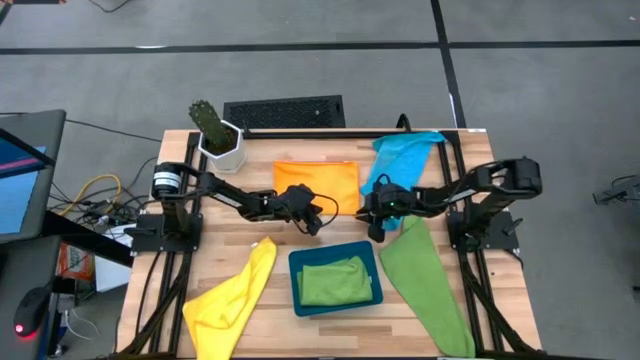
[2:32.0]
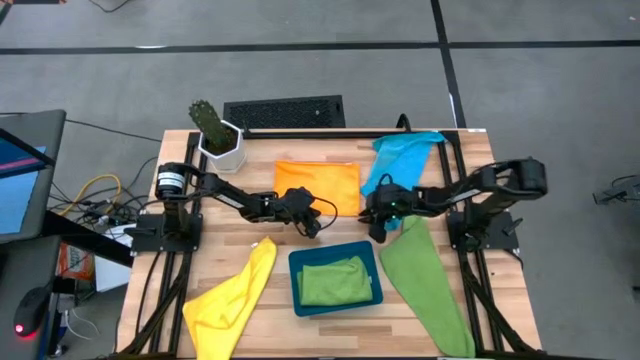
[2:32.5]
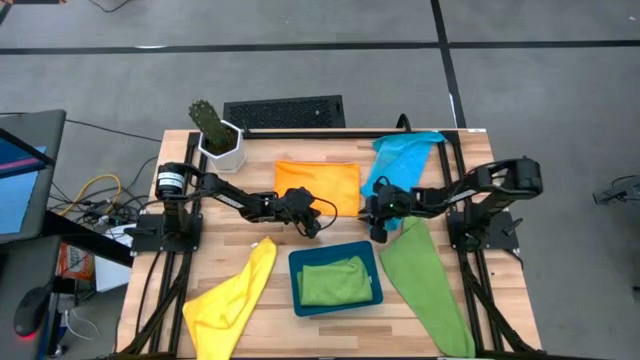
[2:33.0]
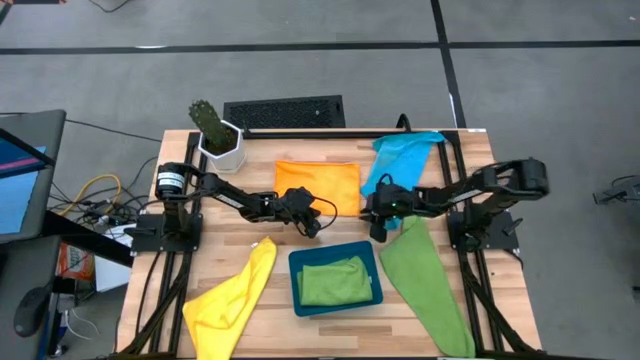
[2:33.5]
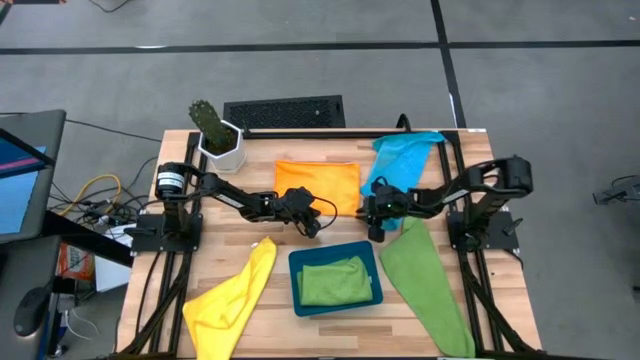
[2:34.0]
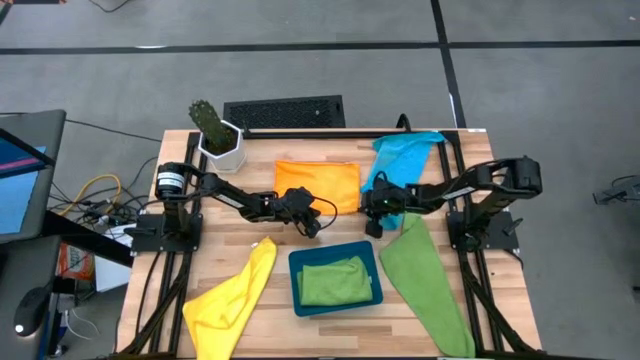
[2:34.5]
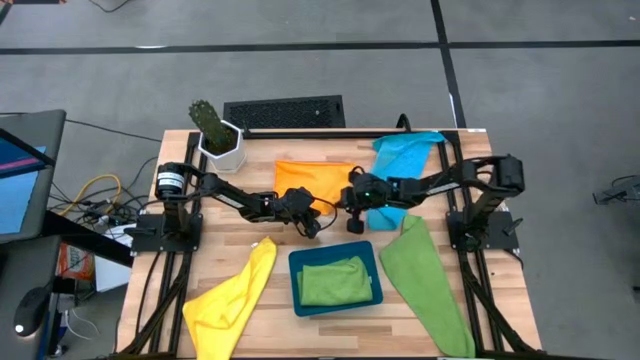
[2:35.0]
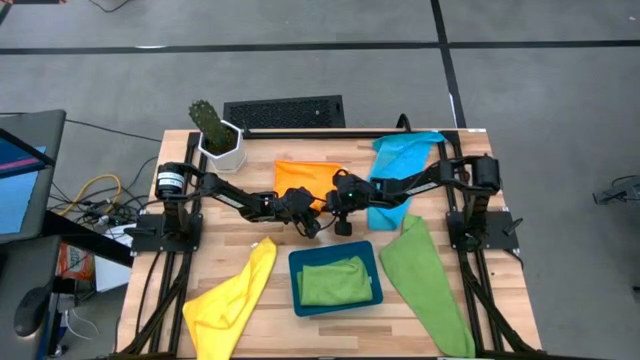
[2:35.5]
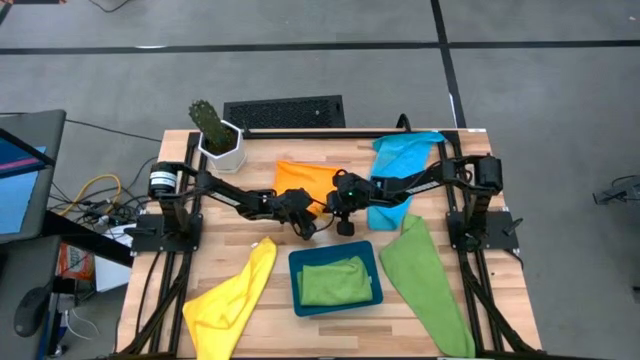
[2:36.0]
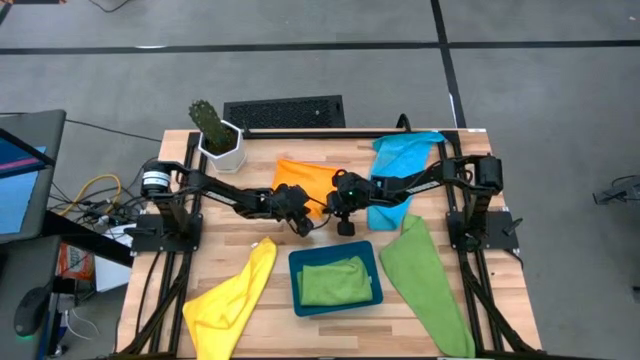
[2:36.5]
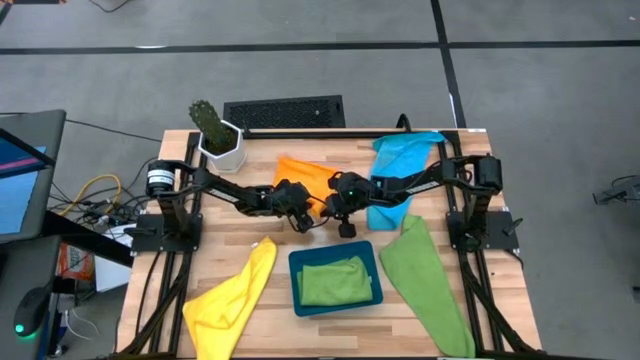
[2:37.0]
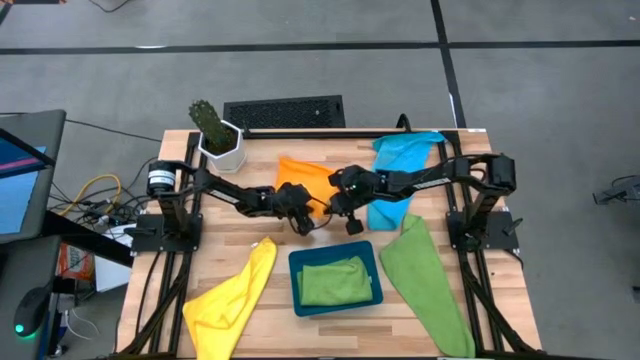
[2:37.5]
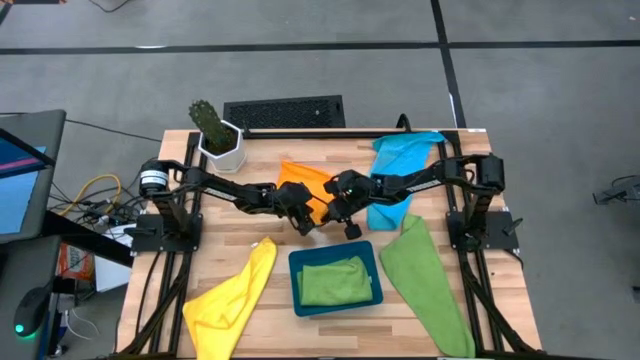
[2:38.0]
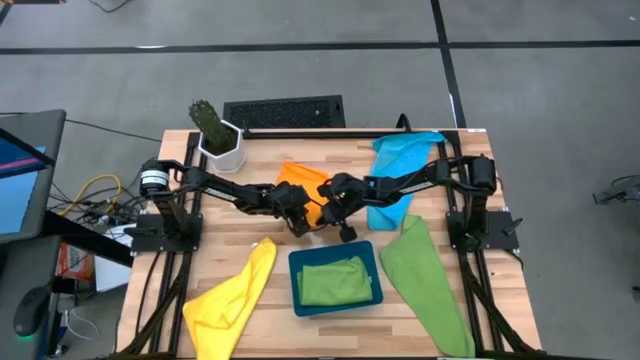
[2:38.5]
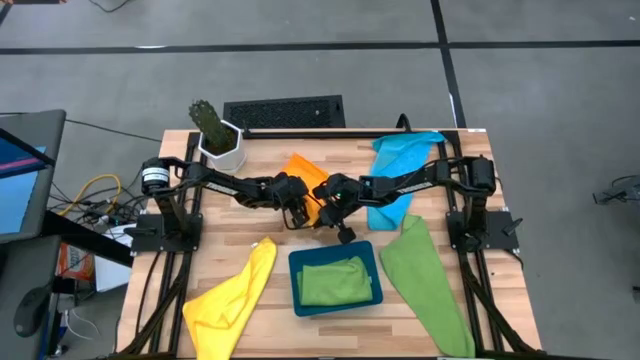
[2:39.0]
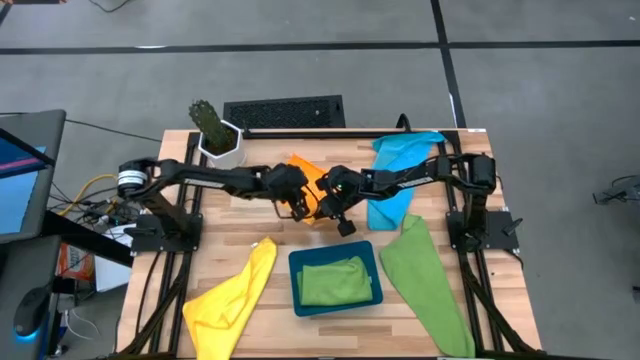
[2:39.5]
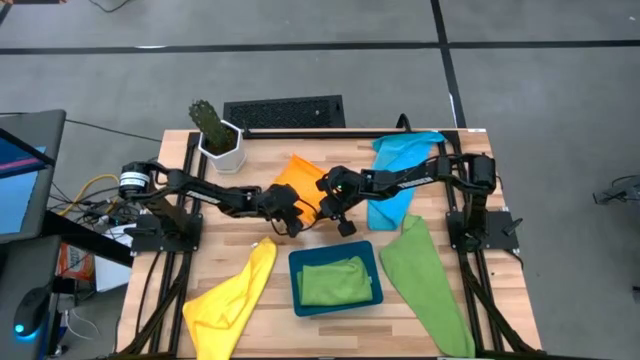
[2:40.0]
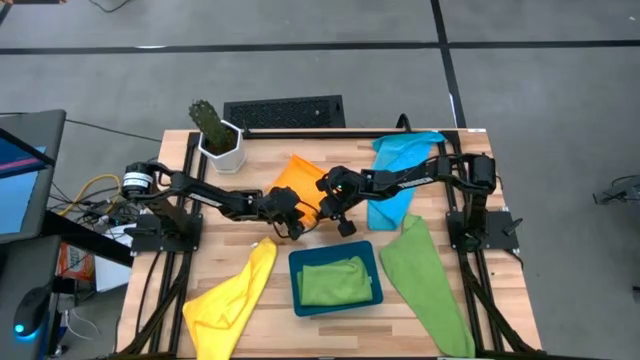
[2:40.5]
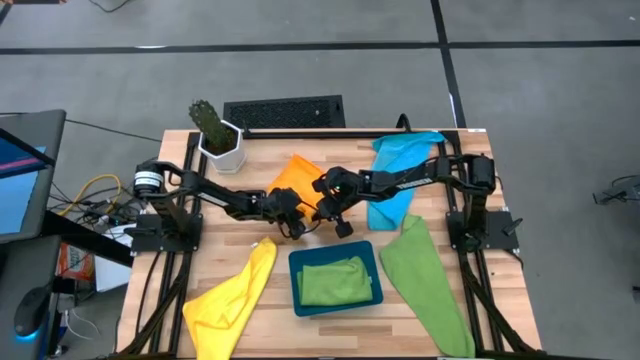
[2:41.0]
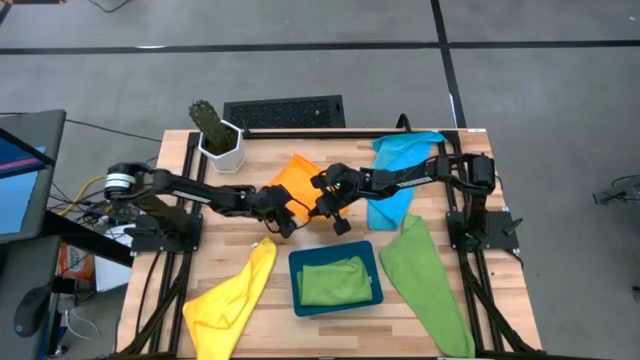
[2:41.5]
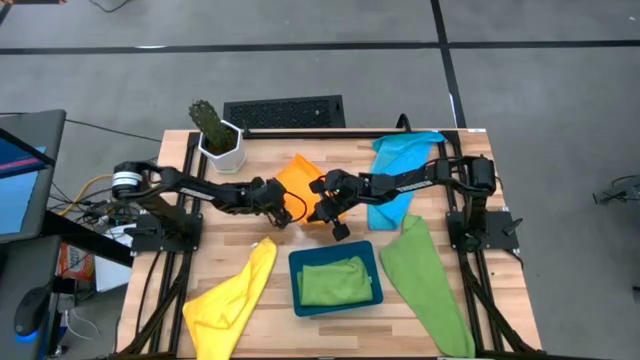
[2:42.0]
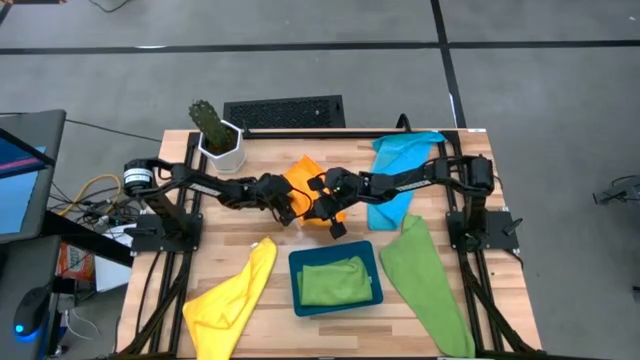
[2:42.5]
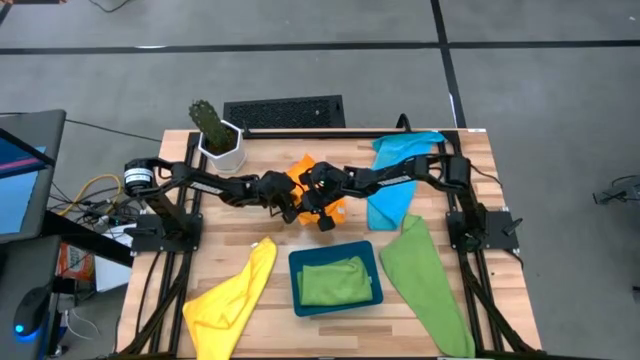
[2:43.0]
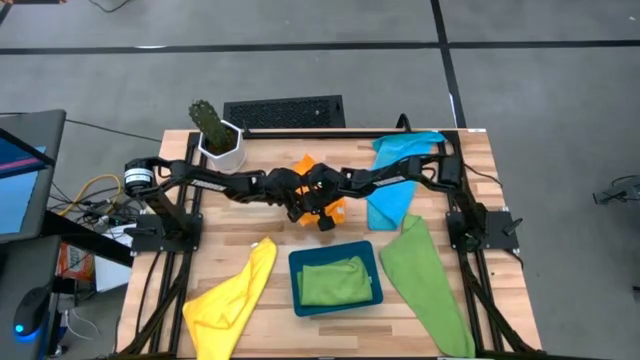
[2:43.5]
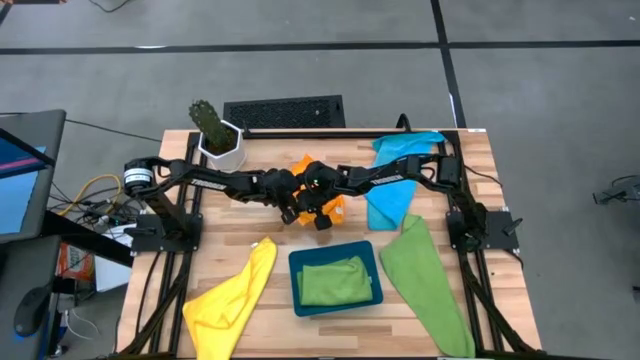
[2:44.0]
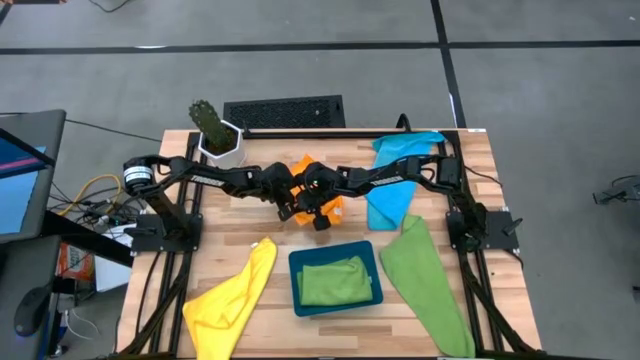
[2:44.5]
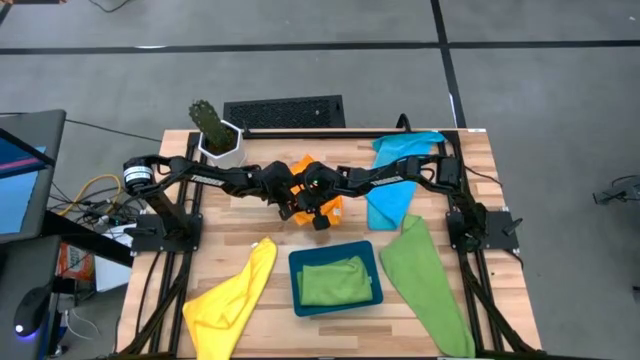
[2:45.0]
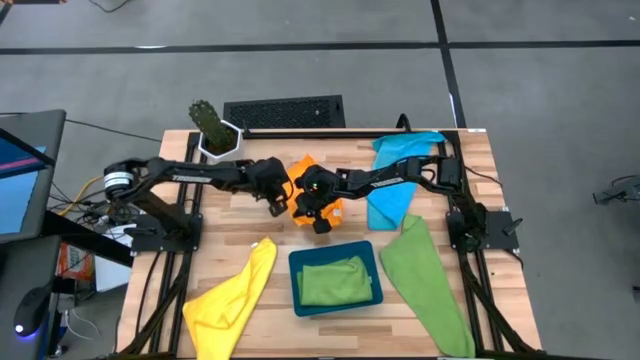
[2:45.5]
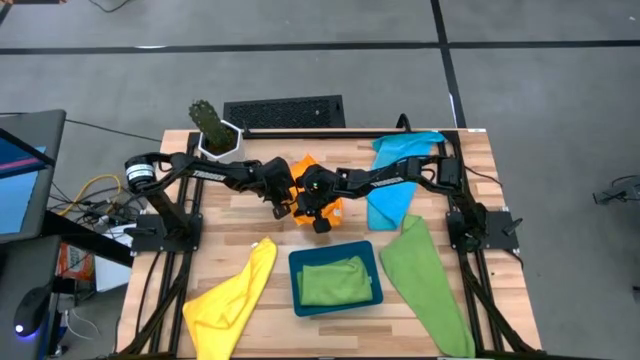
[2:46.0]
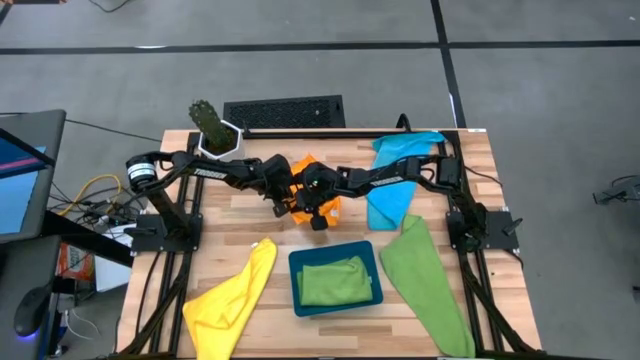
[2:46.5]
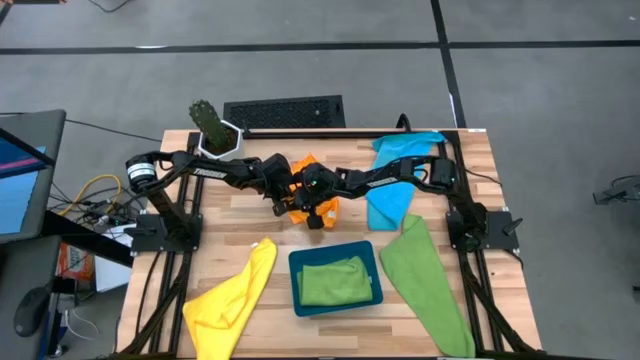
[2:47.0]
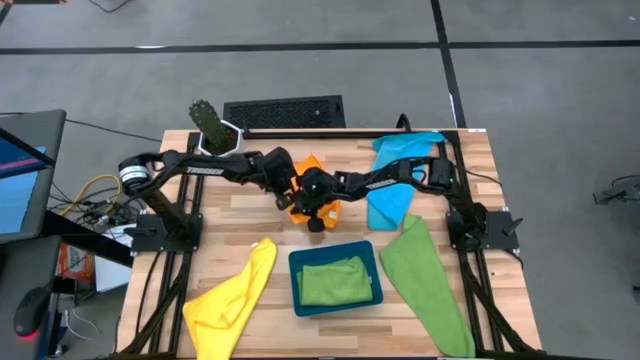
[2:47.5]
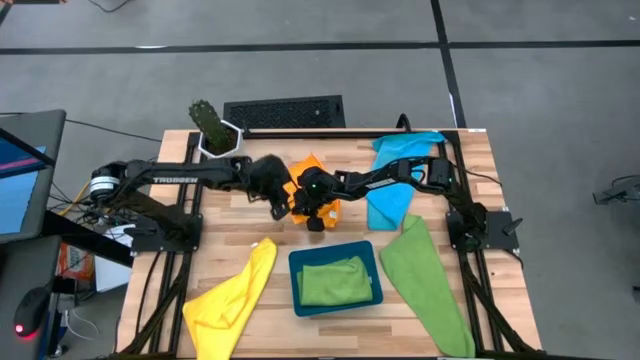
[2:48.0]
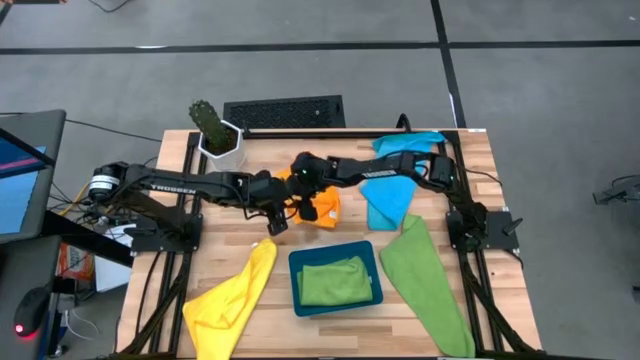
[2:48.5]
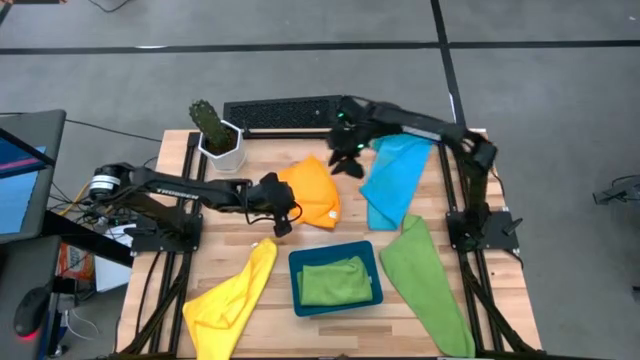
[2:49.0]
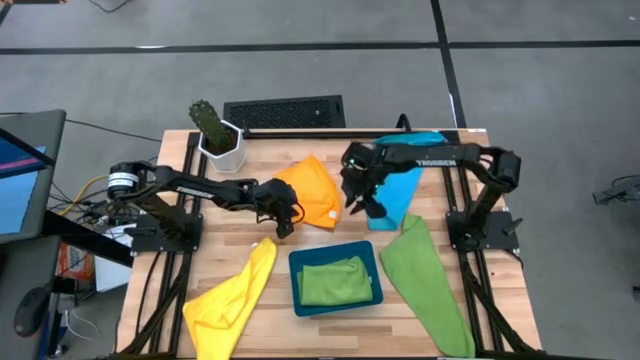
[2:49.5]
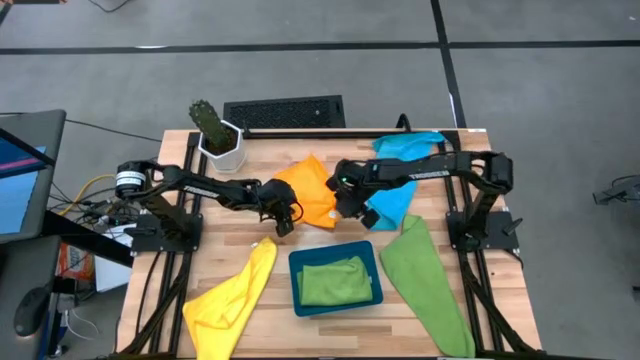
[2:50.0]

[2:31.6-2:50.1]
Task: Fold microfiber towels
Fold the orange microfiber towel

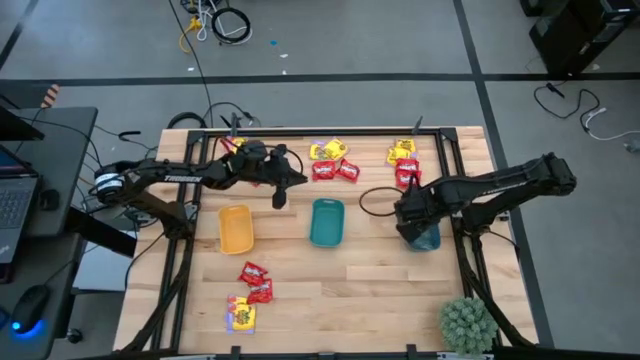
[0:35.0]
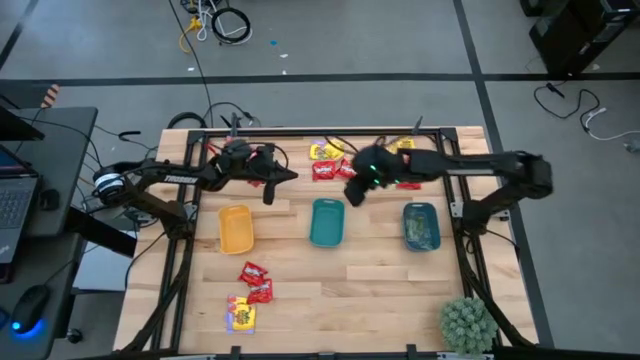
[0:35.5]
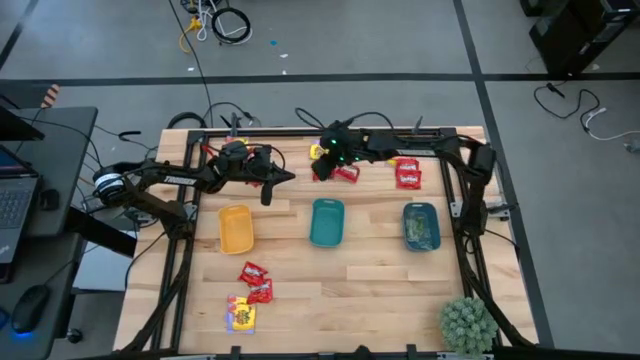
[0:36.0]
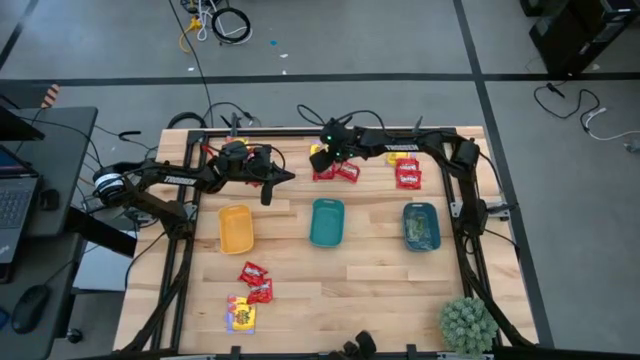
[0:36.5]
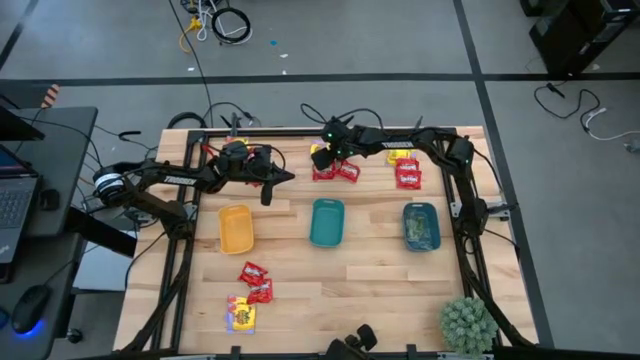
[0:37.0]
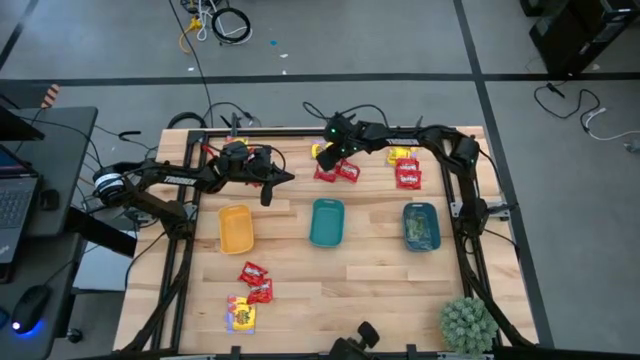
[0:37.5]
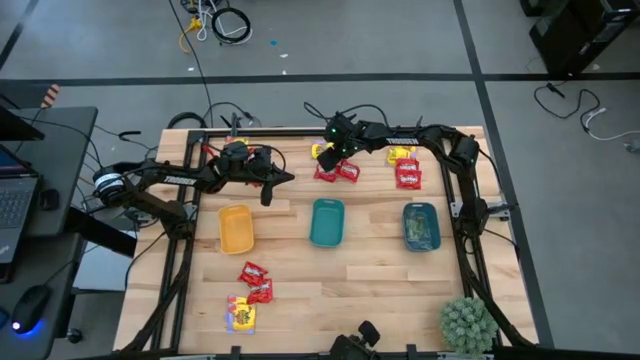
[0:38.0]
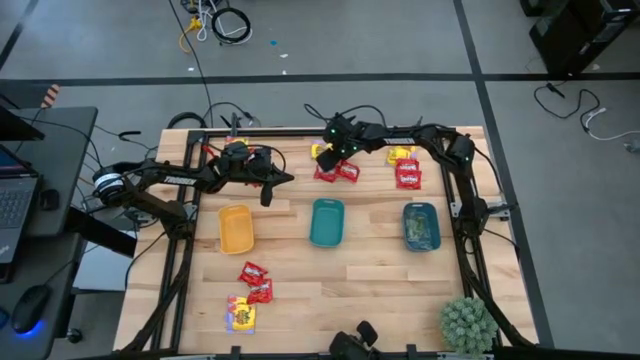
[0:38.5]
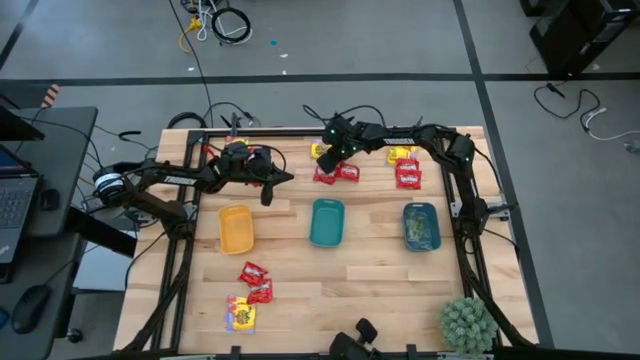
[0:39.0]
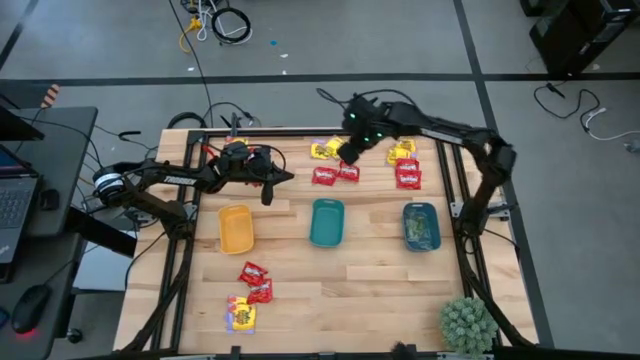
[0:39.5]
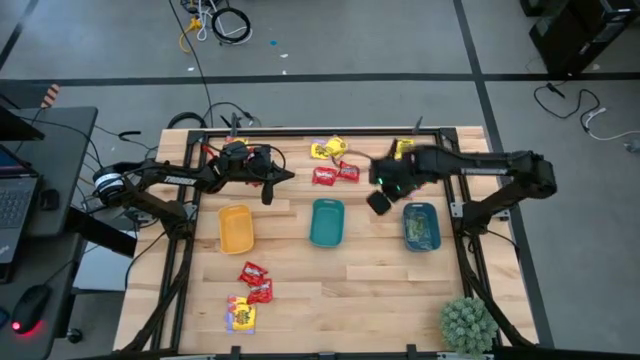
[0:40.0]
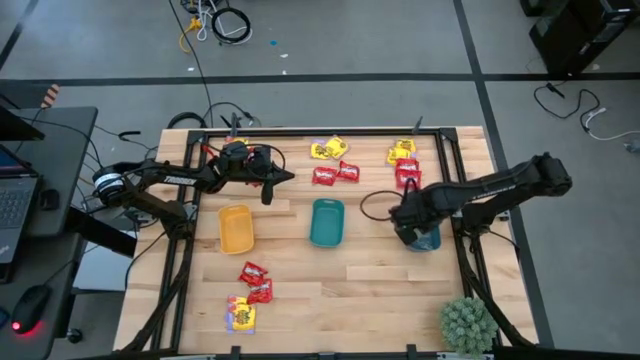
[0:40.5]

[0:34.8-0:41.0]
Task: Sort candy
Put the green transparent candy into the blue bin
